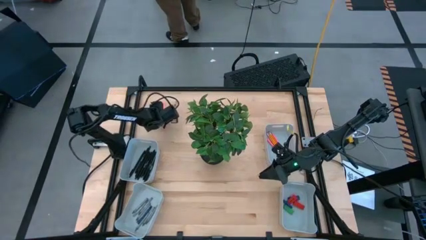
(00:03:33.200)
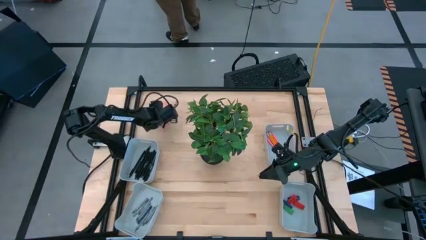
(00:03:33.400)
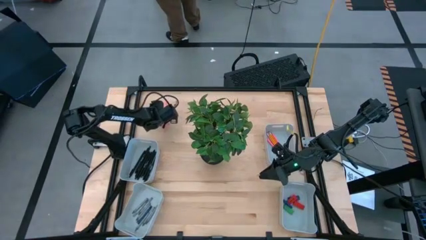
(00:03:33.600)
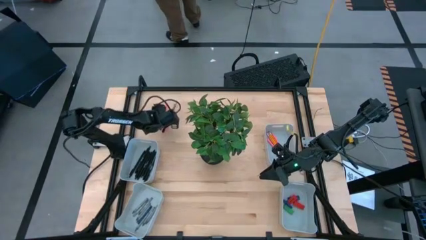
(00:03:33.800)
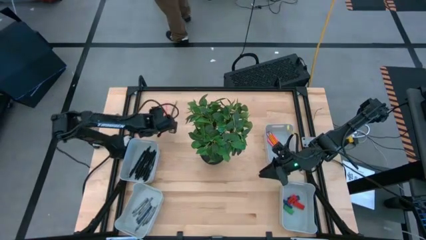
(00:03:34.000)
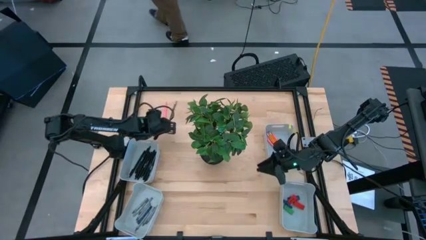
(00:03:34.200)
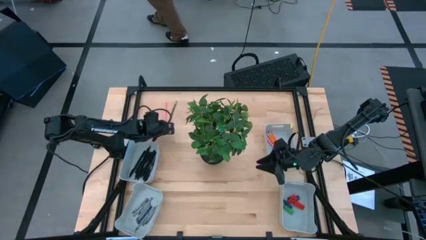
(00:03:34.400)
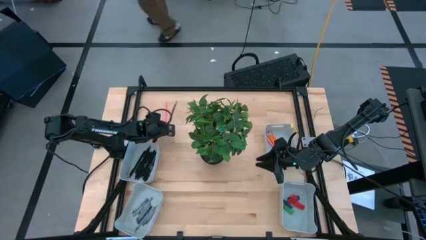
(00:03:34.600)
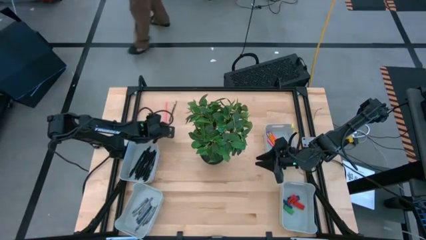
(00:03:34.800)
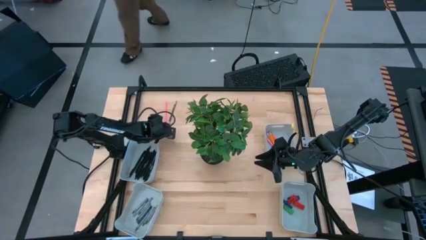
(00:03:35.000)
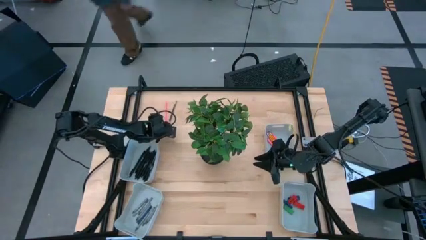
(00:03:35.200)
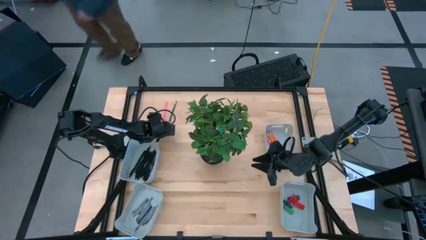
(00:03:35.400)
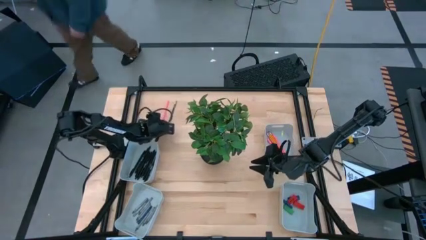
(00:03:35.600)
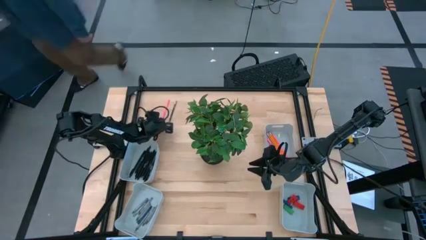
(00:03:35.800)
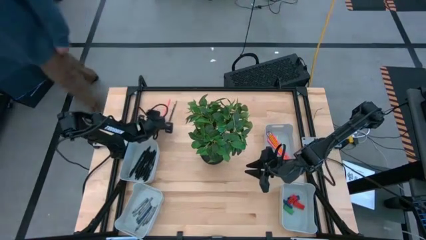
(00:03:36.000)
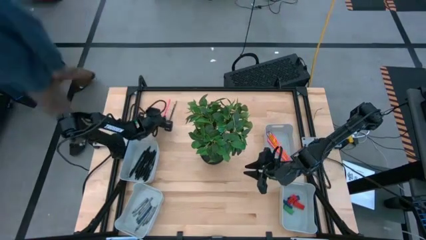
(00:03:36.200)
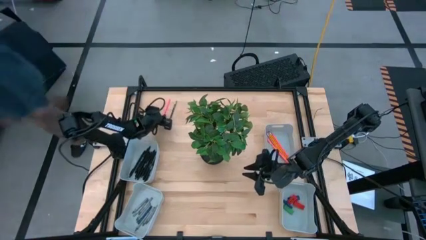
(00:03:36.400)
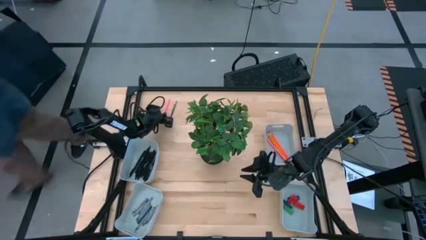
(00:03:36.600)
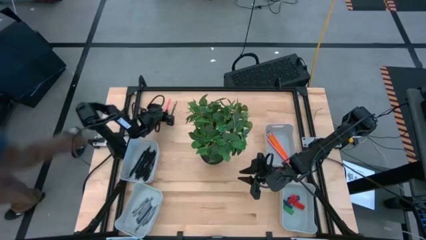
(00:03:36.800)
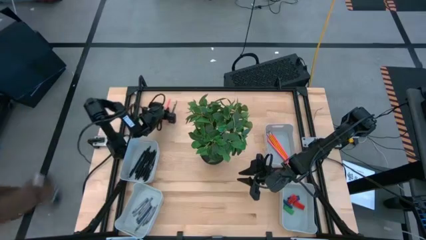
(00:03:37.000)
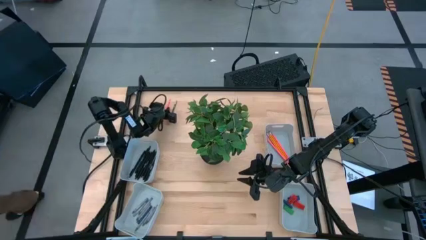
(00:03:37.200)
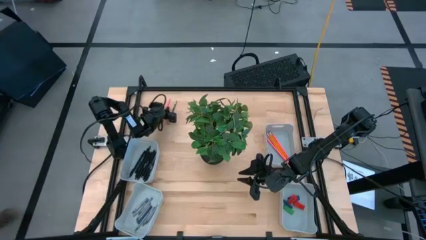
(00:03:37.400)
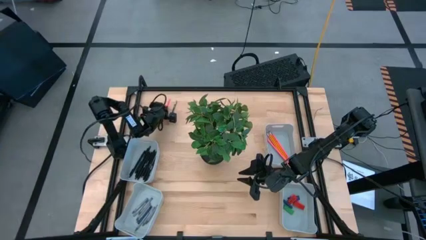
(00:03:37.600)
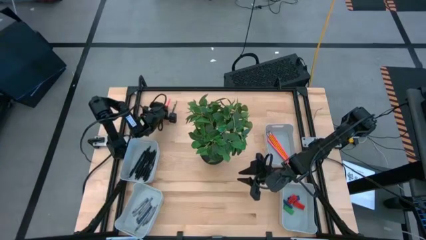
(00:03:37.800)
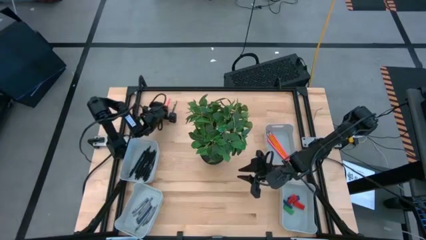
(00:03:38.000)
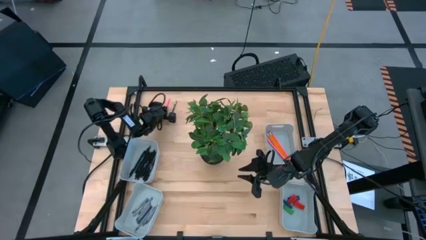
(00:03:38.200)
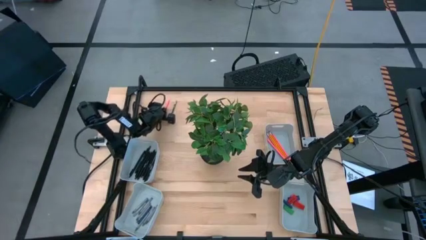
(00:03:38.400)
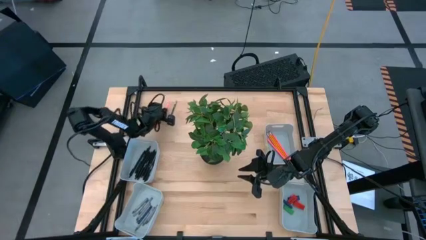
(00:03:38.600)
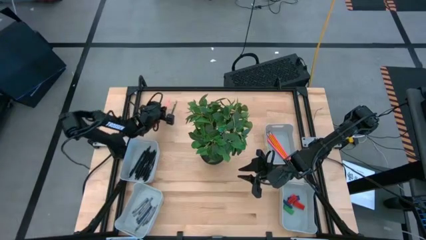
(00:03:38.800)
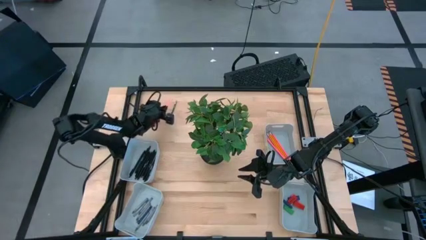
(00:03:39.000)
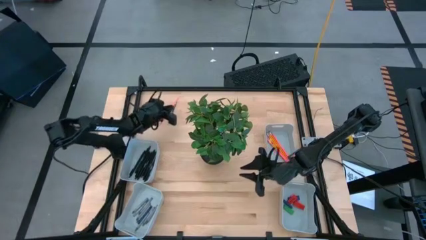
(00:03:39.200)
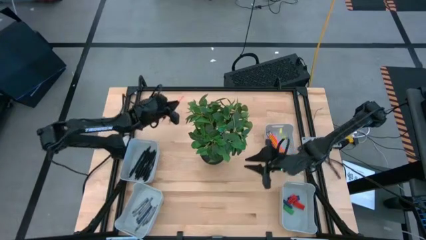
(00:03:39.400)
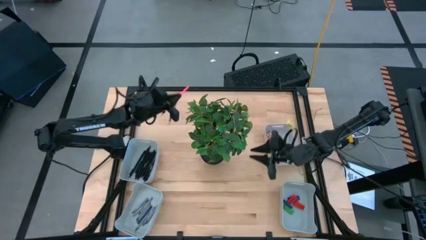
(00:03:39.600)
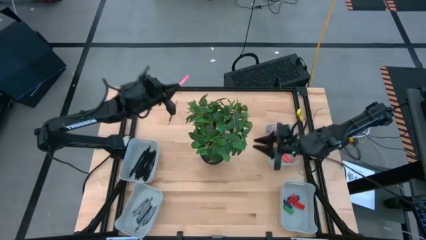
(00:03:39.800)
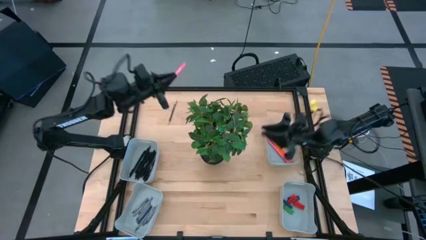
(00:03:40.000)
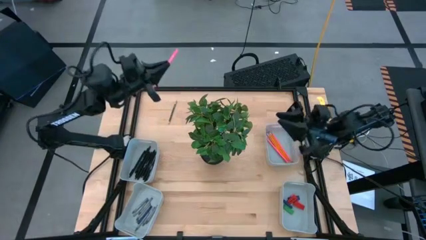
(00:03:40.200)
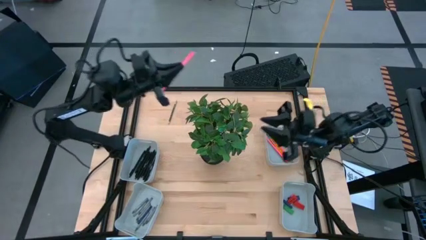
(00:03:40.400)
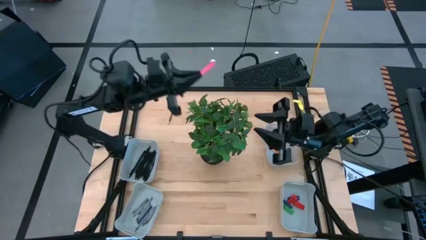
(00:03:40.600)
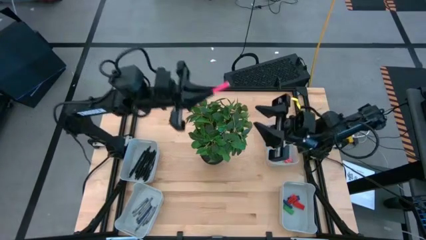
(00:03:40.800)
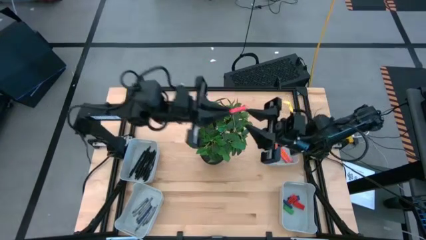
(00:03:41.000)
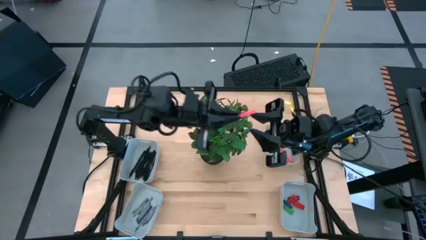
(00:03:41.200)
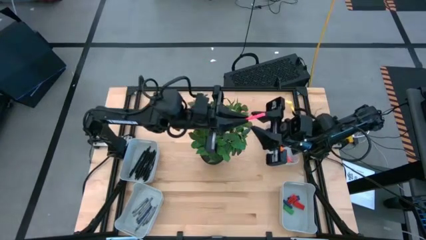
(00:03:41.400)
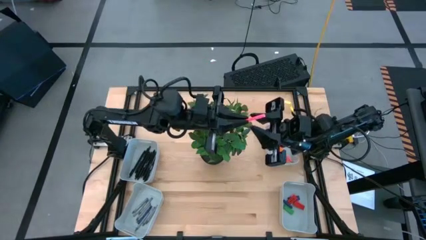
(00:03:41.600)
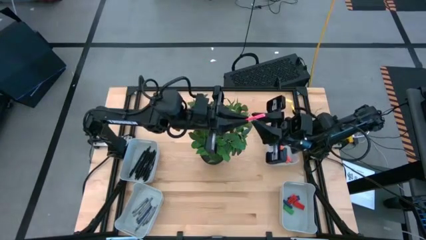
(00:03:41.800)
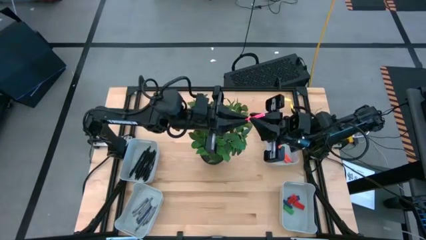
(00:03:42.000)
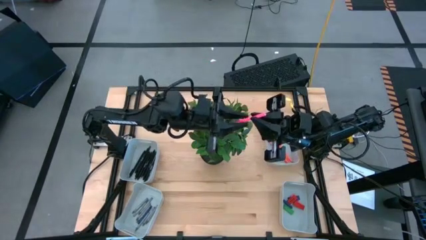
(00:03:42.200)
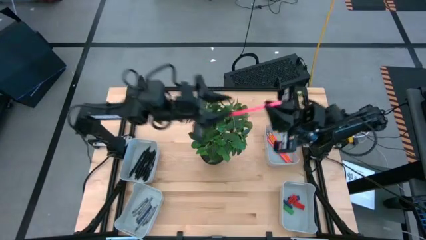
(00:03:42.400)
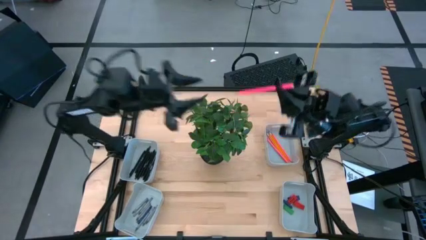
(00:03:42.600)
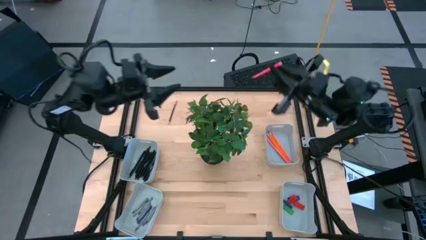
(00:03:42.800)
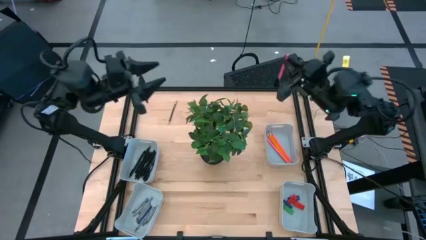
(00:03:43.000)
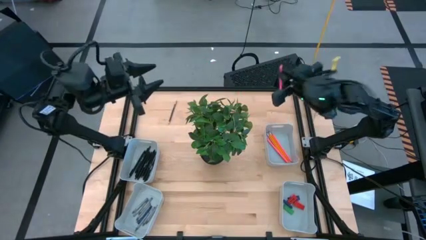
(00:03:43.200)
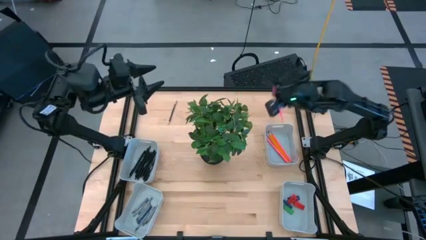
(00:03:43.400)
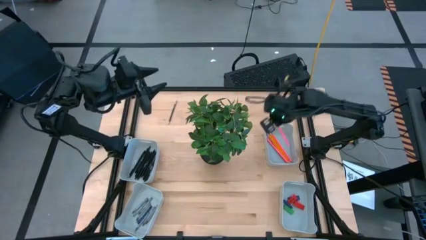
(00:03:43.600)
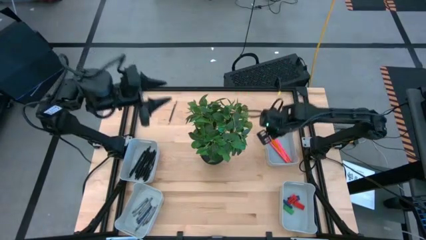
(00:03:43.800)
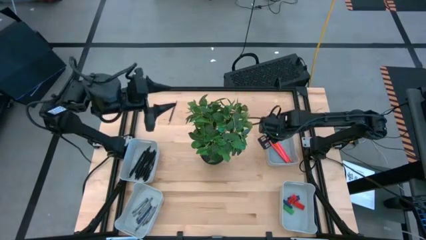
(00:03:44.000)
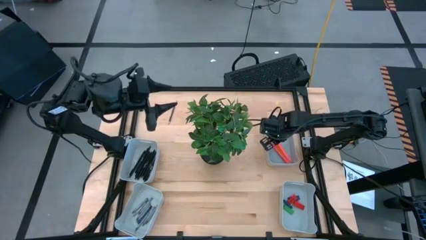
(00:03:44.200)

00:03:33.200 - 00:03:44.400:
Task: Sort crayons/erasers/pens/pencils in bins
Put the pink pencil into the top right gray bin

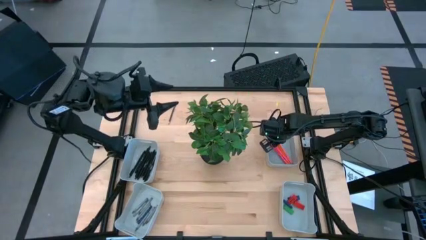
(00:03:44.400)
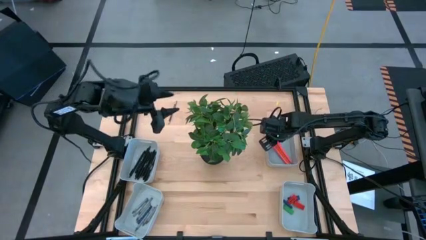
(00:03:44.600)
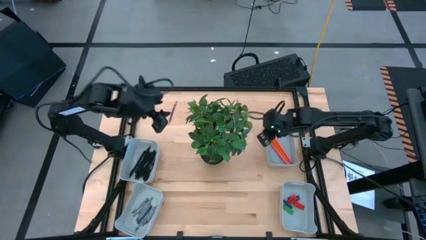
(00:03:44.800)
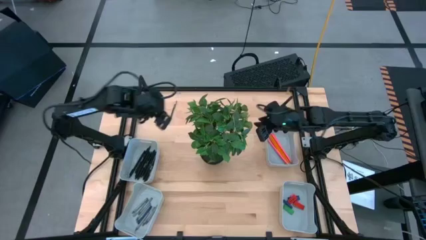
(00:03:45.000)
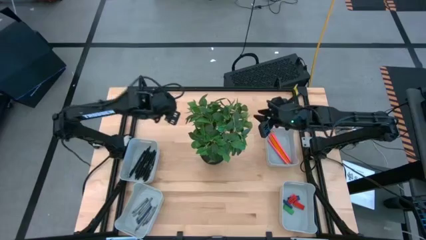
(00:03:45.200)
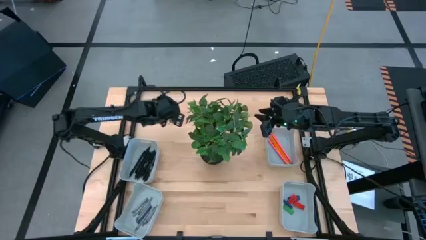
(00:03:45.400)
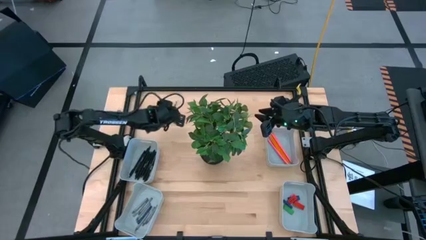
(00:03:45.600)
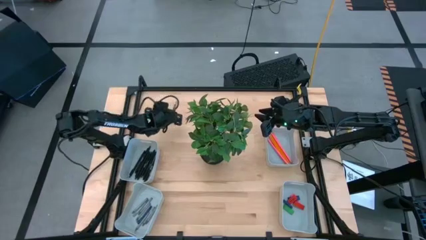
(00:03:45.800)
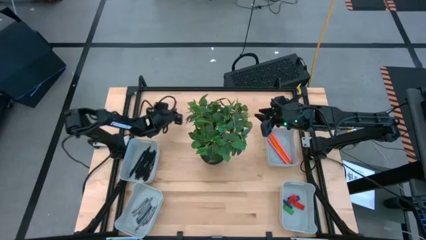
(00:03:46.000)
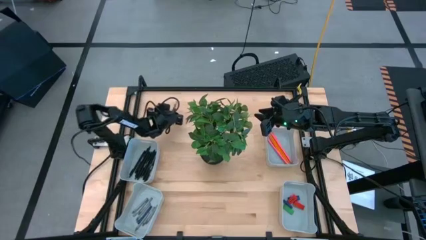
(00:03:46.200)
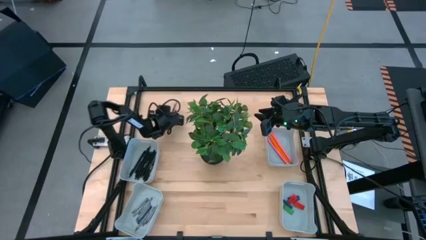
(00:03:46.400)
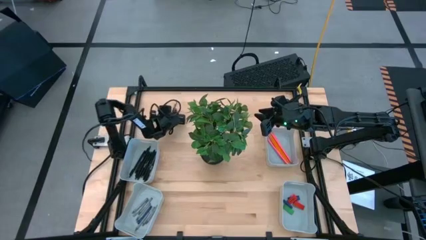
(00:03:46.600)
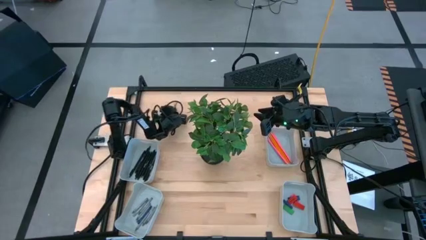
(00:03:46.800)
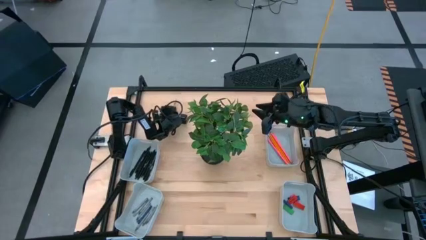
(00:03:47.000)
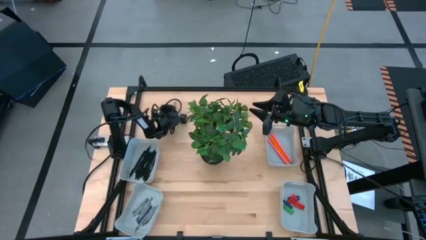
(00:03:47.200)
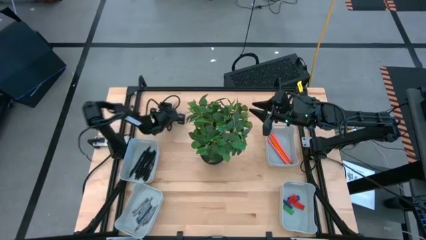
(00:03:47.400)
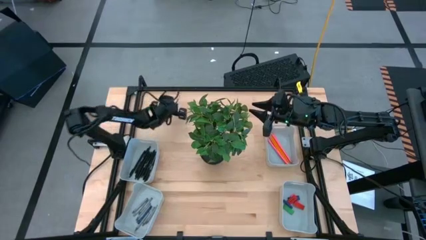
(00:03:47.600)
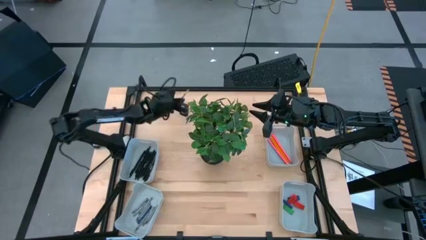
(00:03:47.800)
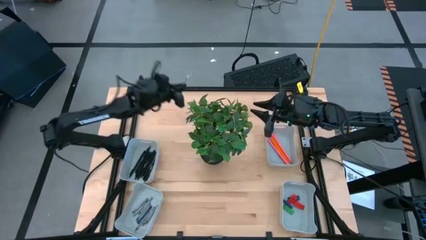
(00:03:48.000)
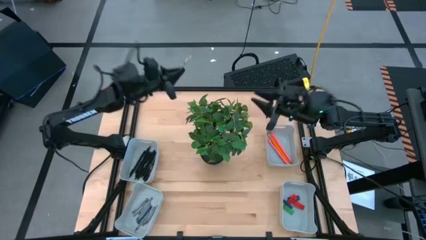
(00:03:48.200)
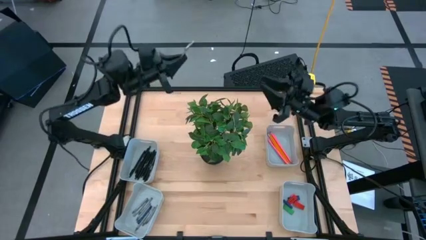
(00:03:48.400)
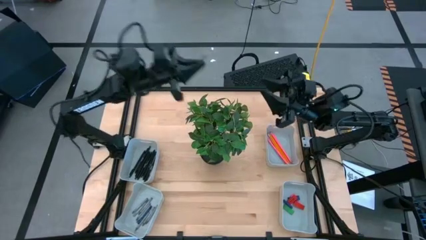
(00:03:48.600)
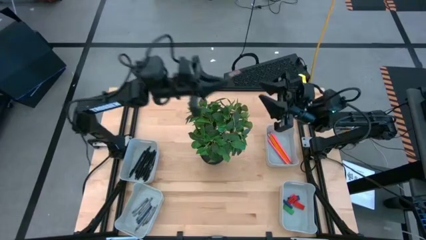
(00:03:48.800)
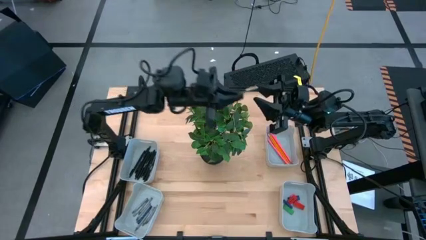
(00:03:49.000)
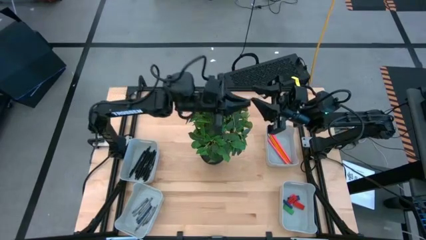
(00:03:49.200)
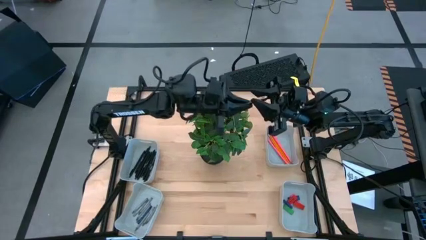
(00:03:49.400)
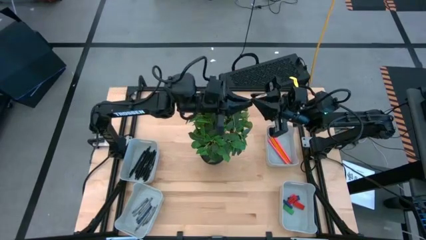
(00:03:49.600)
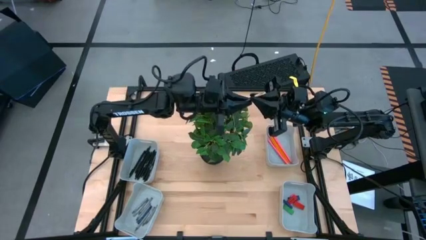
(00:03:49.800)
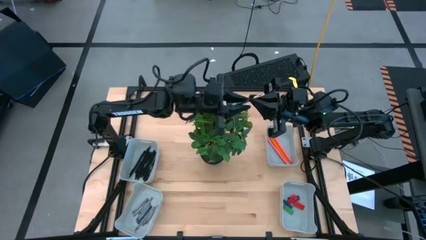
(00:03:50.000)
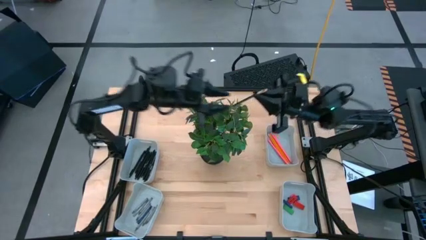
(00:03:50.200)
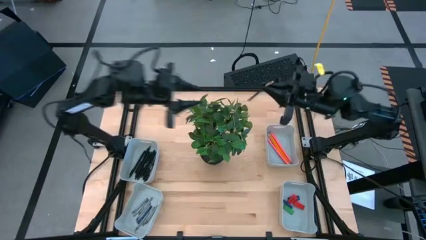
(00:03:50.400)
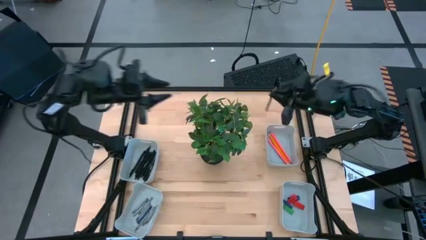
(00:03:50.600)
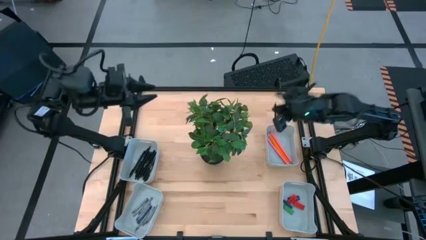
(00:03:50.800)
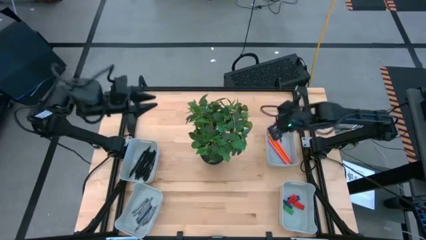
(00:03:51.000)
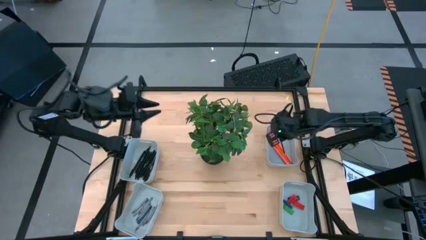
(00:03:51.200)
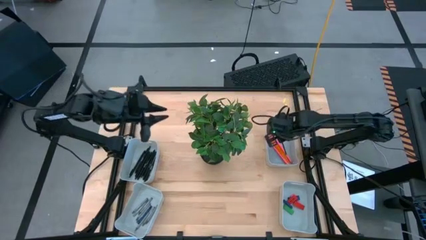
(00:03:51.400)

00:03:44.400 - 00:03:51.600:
Put the blue pencil into the top right gray bin
